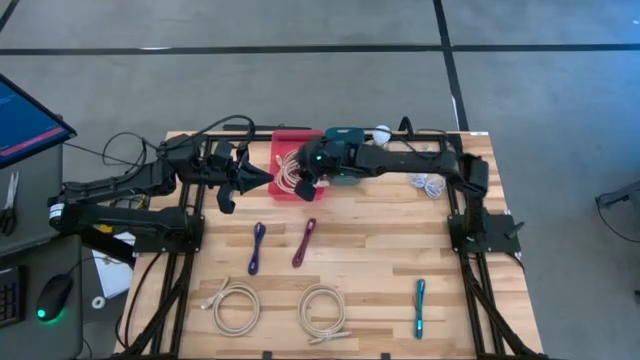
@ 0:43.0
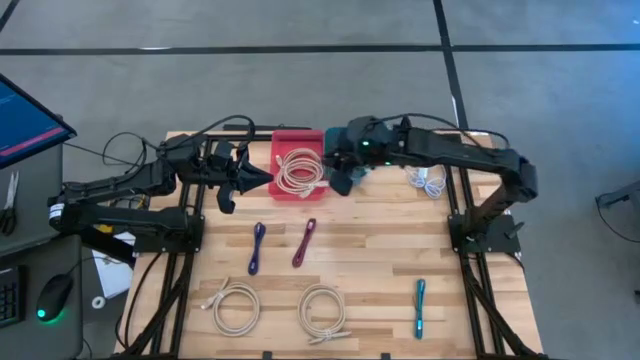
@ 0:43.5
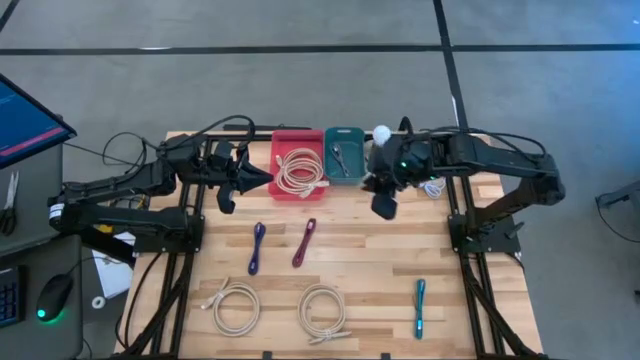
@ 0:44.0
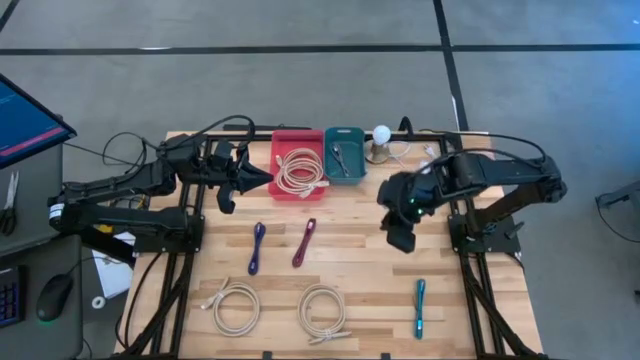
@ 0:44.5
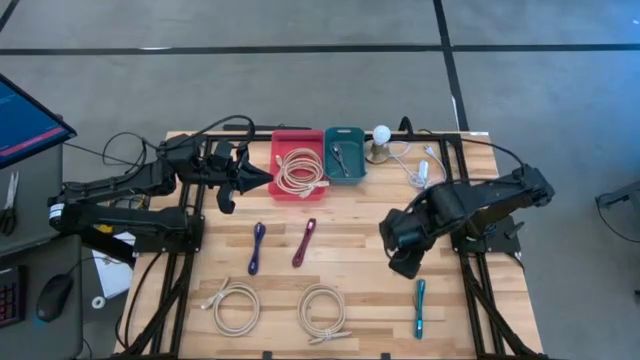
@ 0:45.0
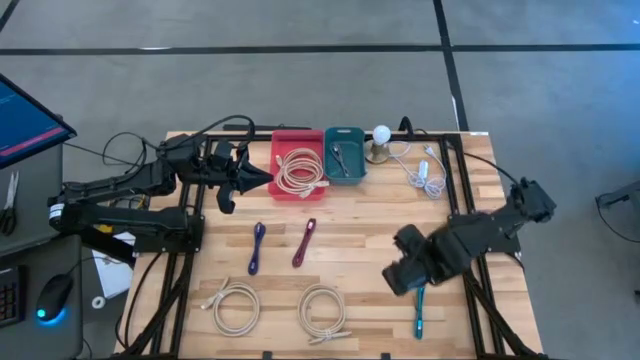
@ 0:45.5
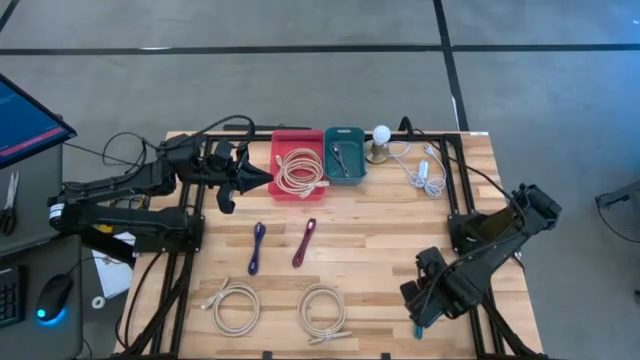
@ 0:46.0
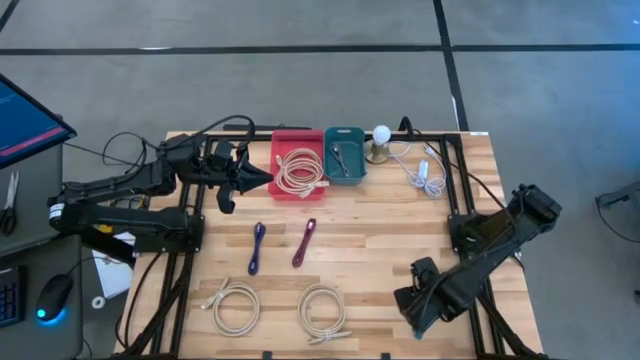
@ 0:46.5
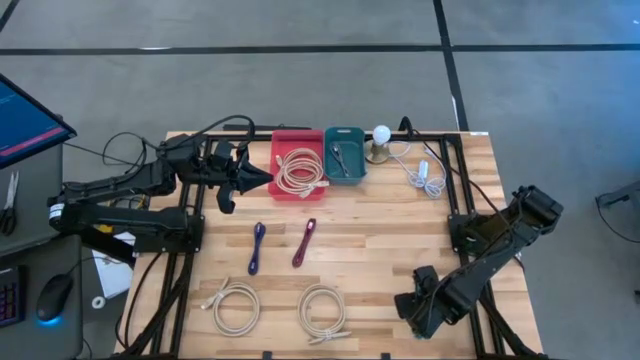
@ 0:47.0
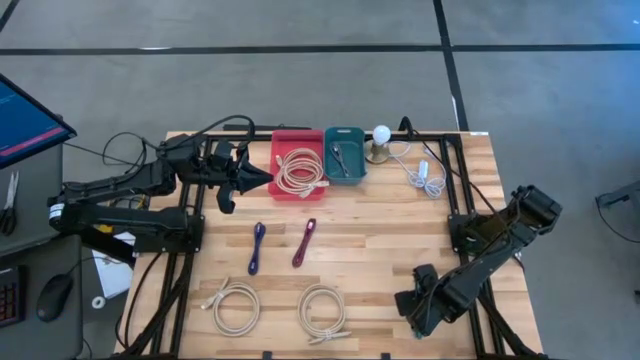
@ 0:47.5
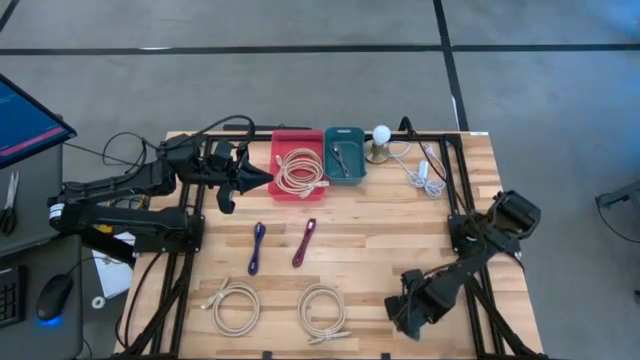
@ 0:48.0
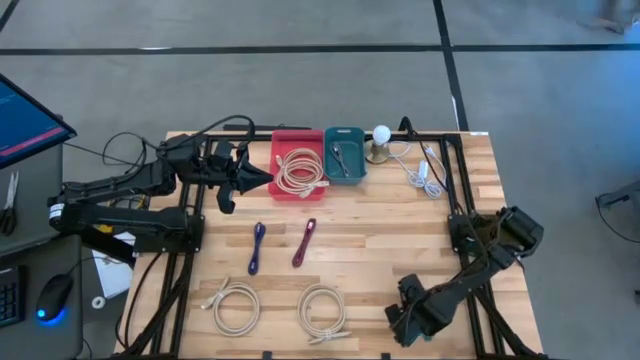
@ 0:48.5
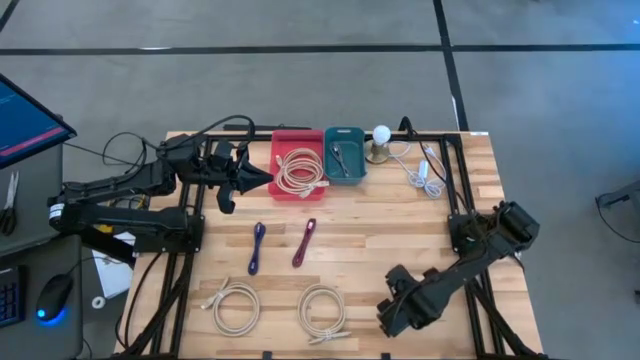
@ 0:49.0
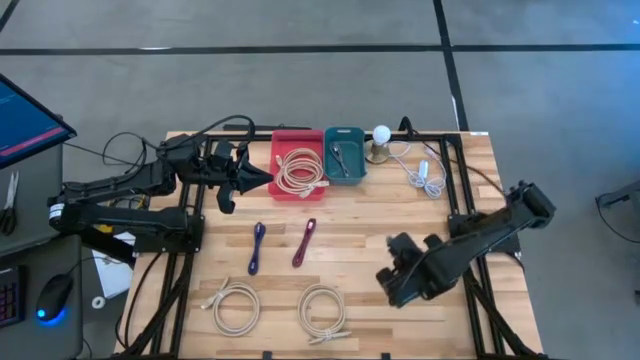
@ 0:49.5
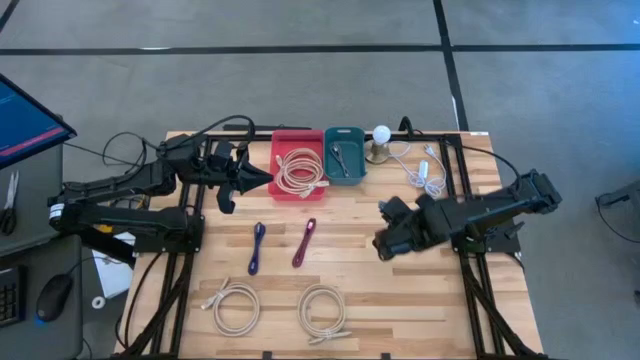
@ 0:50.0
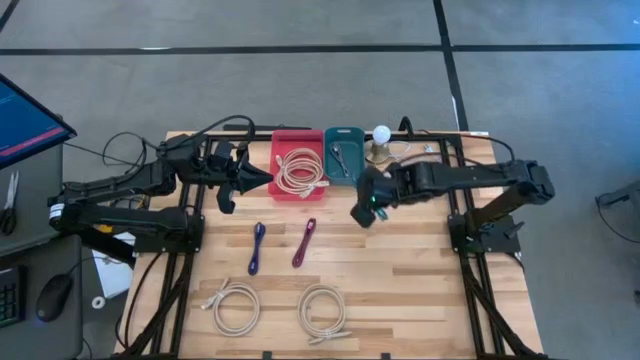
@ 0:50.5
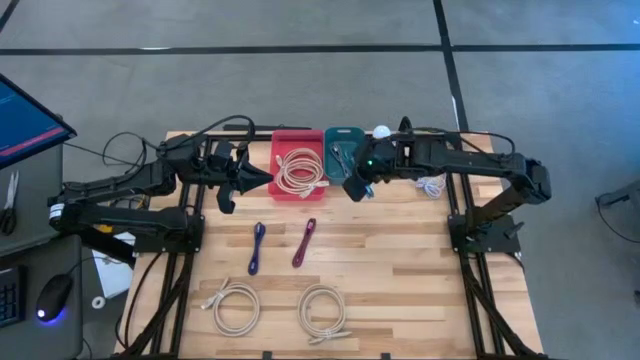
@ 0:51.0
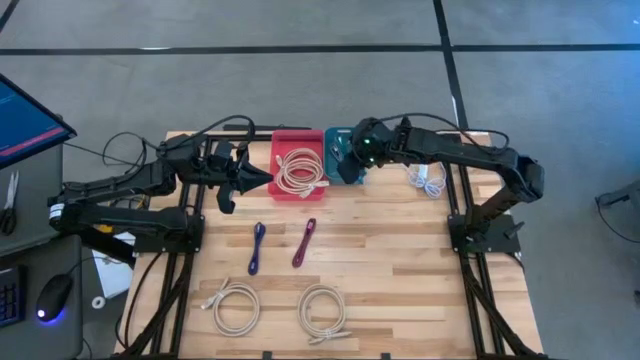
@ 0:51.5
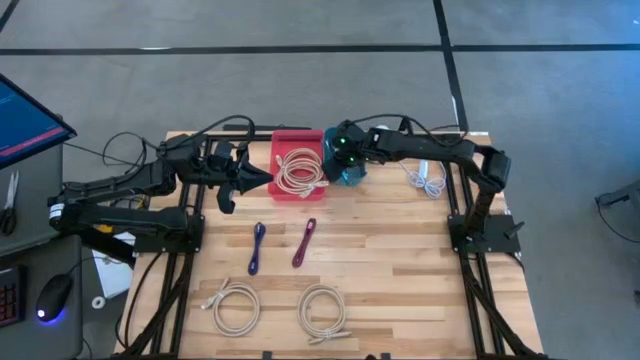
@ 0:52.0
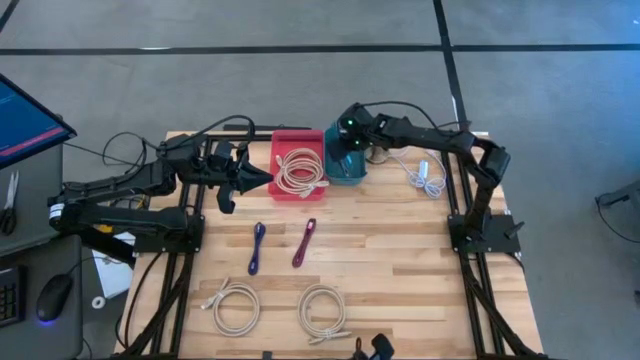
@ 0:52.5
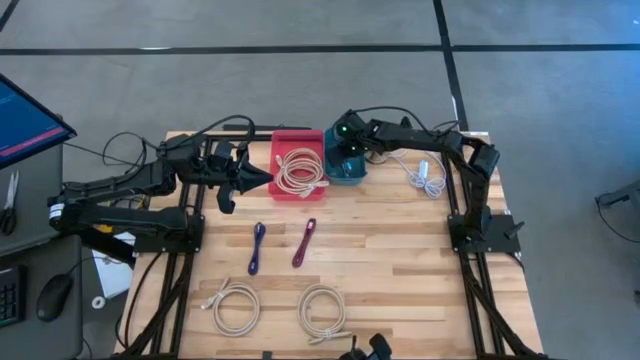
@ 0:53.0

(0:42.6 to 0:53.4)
Task: Pick & Place USB Port
Put the blue charger cable into the blue bin

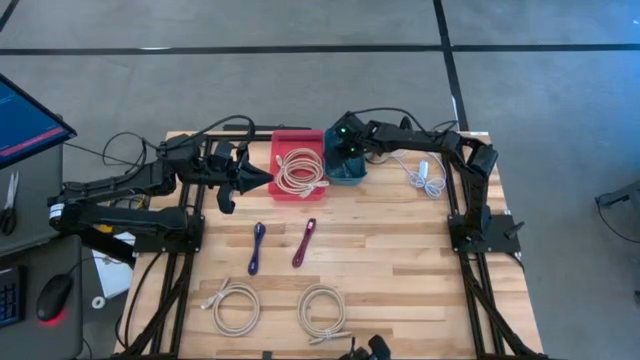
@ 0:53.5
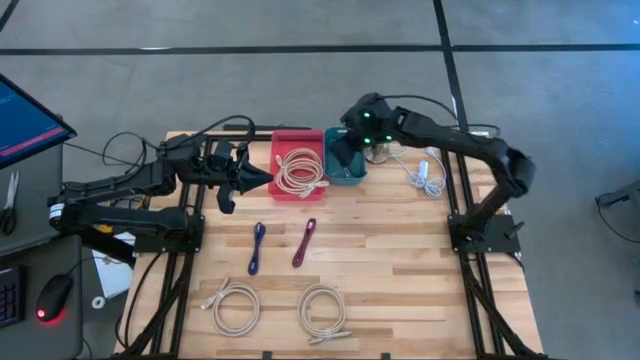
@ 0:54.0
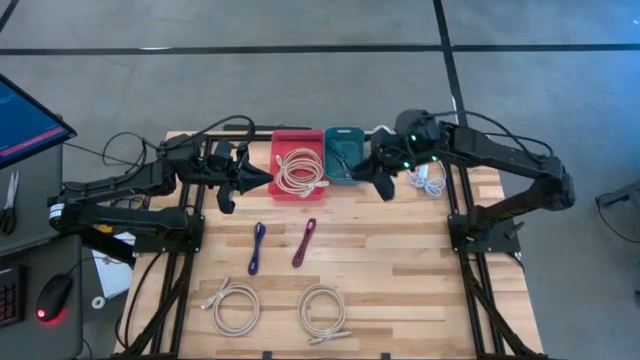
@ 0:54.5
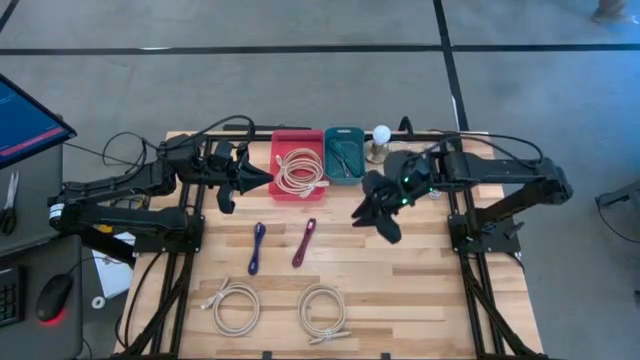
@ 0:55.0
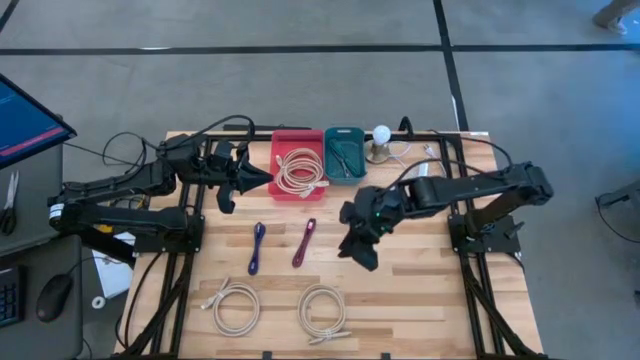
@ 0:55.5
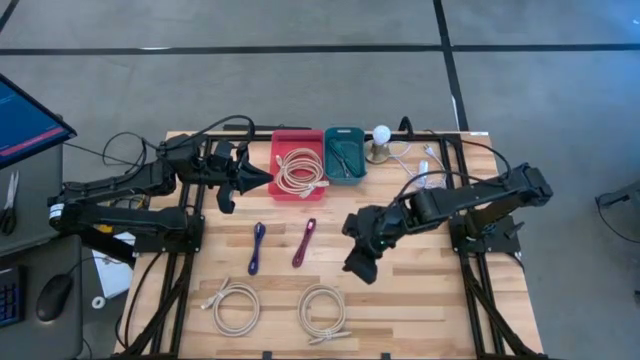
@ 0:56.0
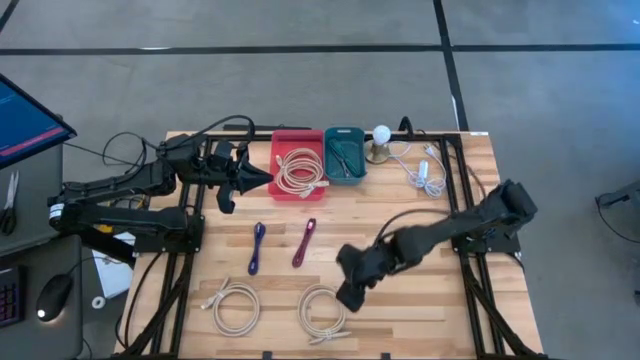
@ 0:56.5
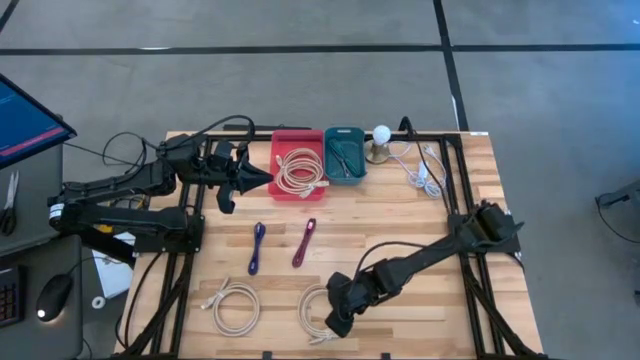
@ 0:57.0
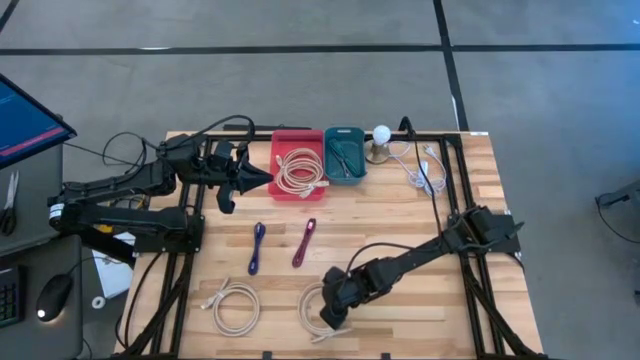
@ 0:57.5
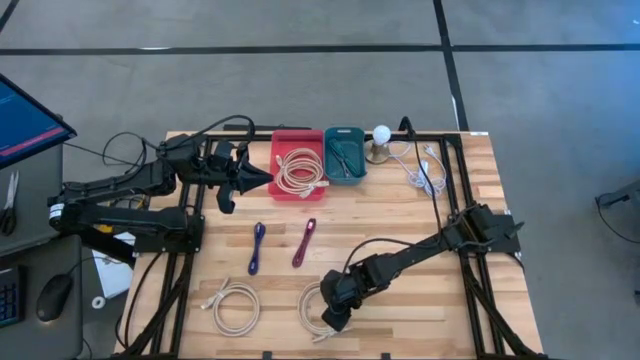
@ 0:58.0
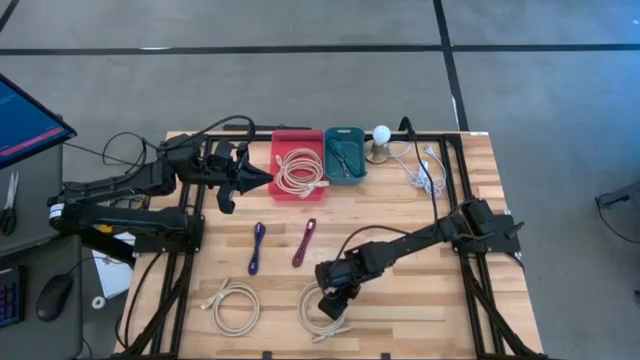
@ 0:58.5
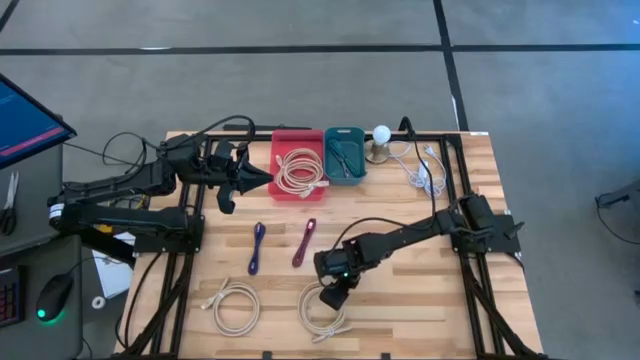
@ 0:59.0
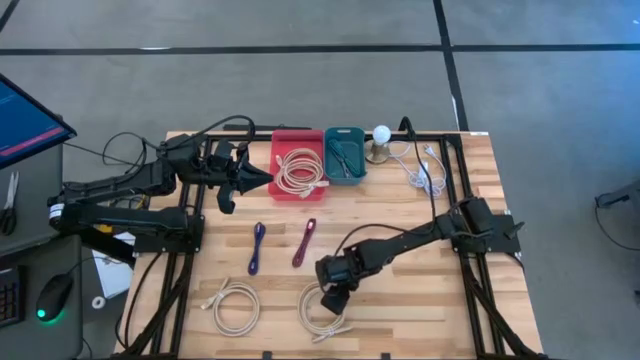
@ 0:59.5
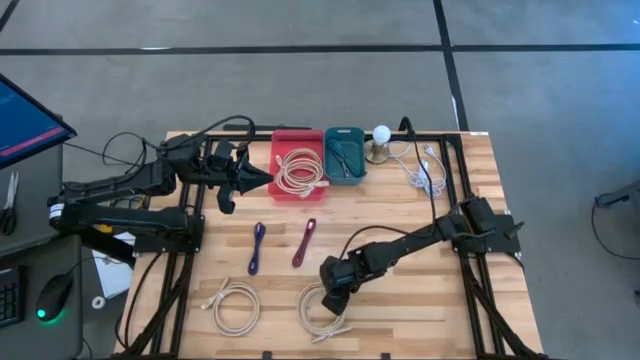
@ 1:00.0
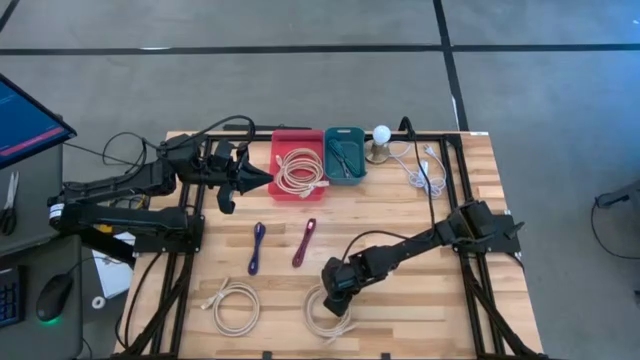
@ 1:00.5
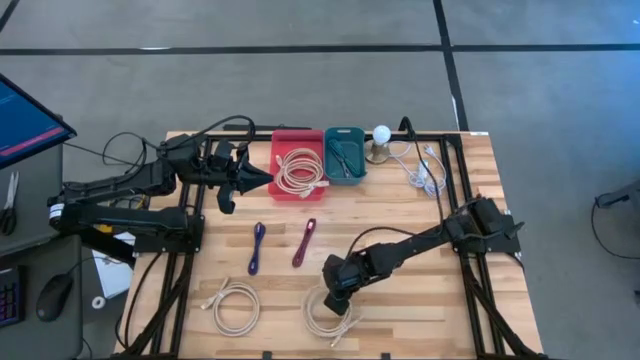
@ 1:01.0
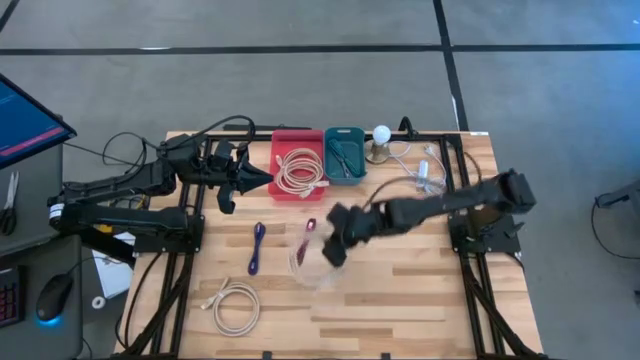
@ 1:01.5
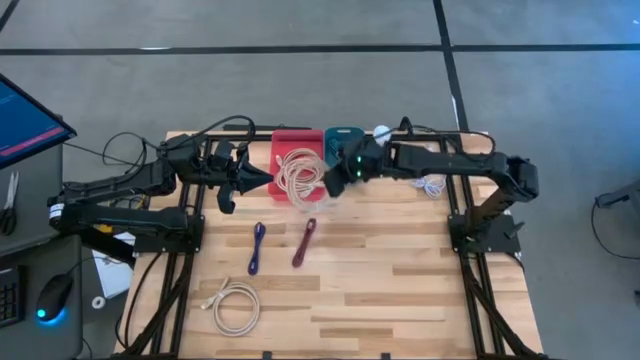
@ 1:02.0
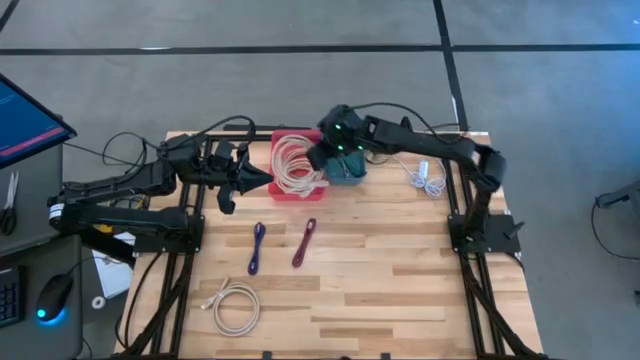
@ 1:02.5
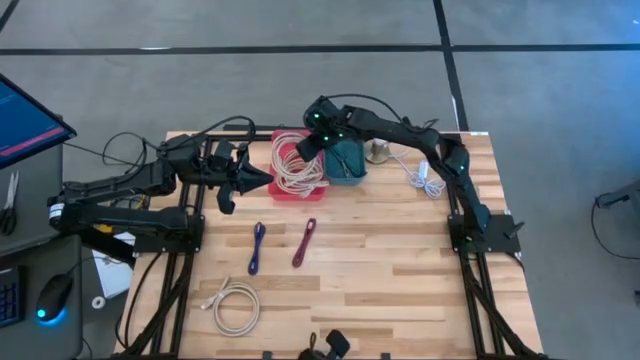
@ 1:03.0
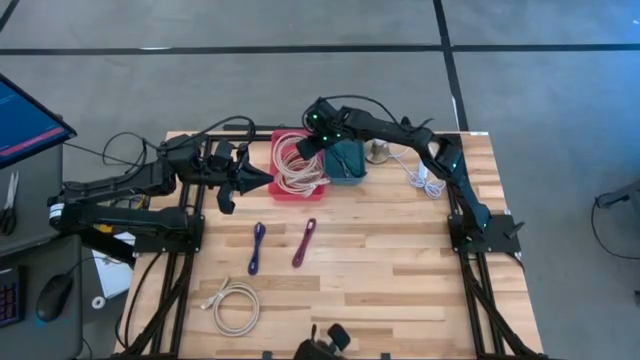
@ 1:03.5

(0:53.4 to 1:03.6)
Put the light brown HDMI cable into the pink bin
